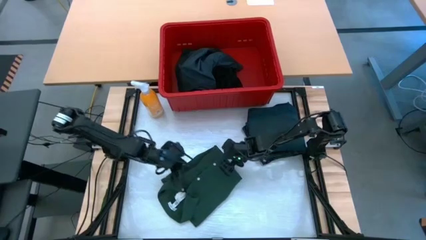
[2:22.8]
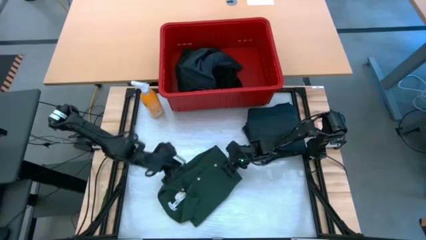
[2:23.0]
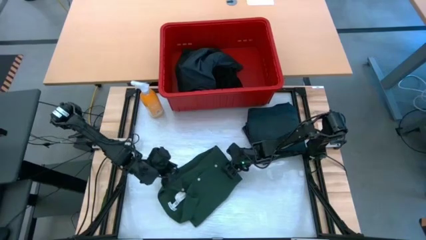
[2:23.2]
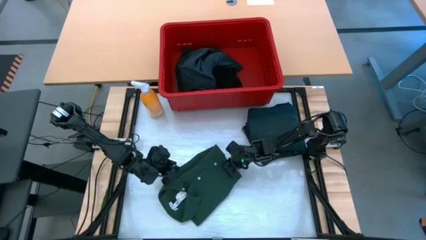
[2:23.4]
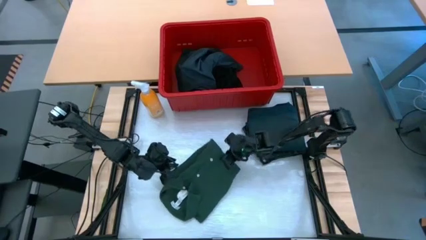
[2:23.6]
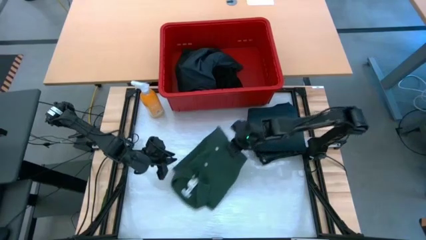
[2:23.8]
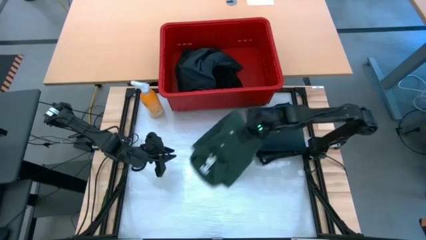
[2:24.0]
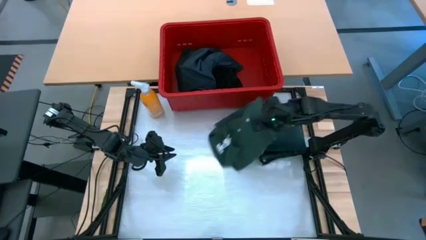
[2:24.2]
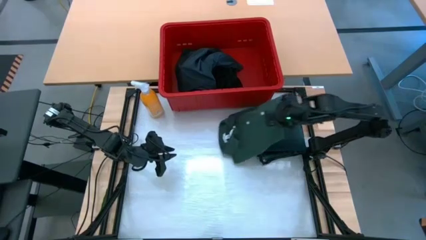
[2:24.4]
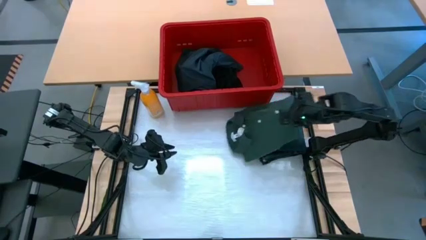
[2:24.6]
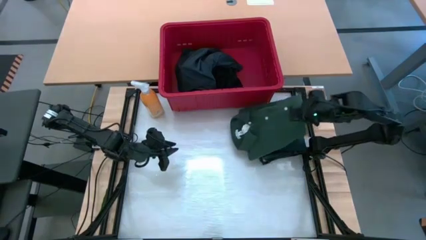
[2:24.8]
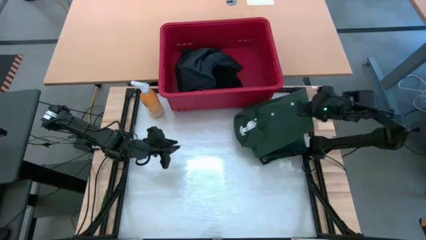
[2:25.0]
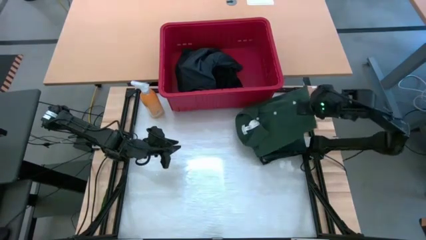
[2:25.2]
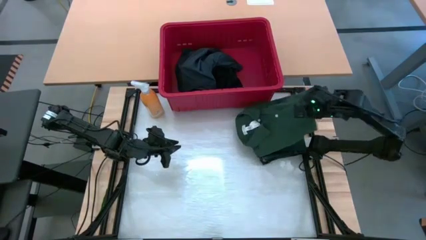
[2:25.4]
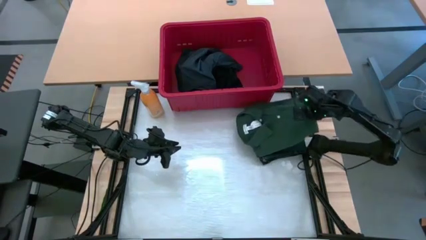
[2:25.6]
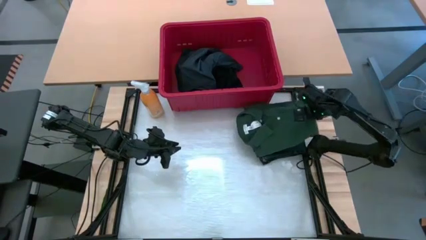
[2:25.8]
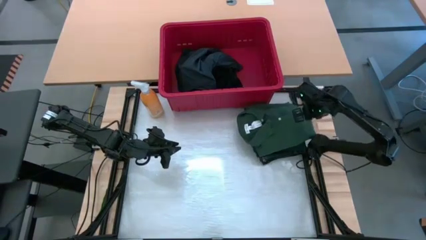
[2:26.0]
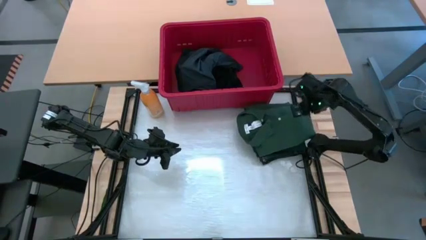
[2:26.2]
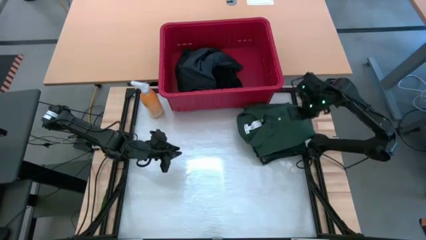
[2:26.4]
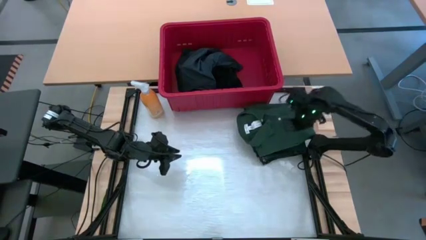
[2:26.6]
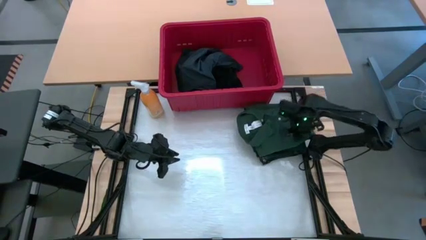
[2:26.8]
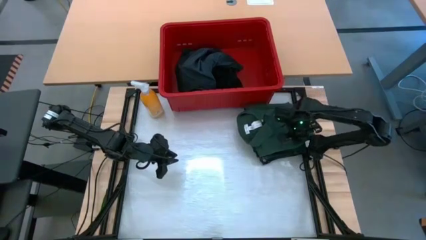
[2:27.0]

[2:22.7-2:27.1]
Task: Fold Laundry from Bin
Stack the green shirt on top of the blue pants

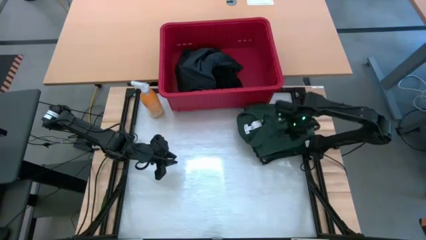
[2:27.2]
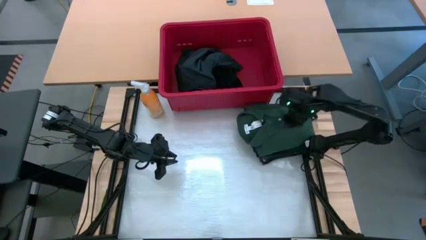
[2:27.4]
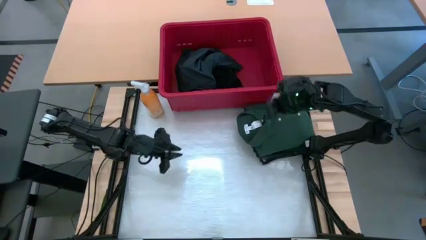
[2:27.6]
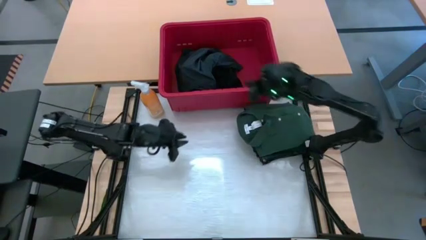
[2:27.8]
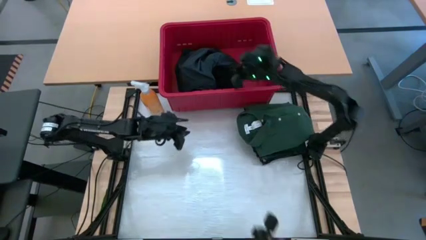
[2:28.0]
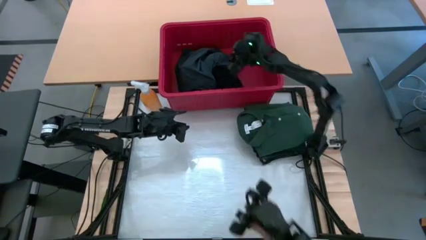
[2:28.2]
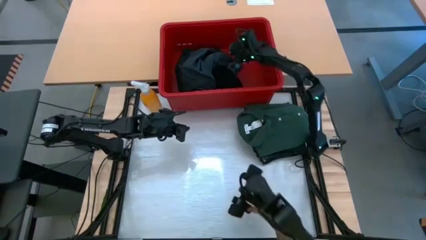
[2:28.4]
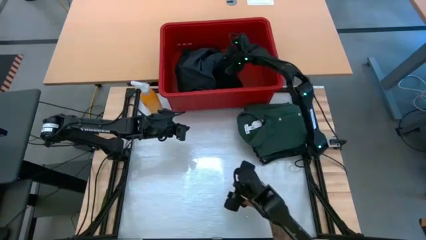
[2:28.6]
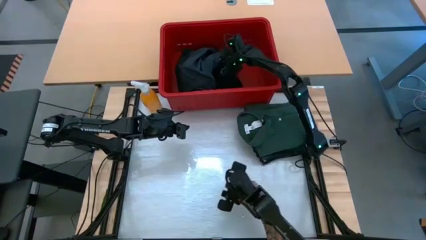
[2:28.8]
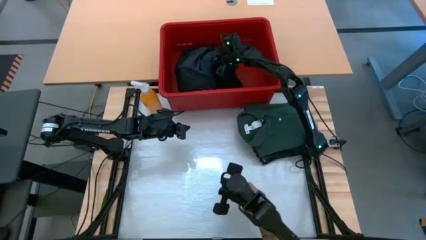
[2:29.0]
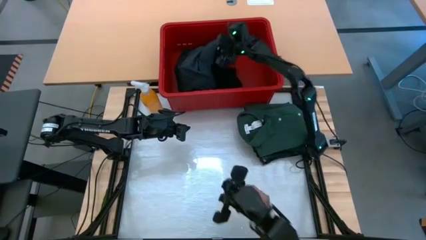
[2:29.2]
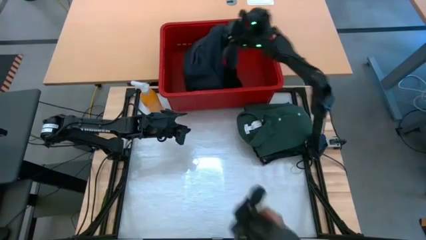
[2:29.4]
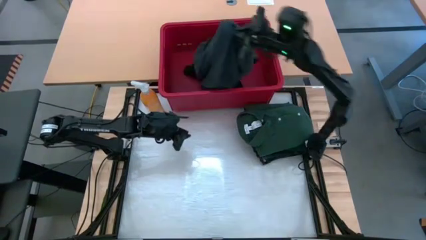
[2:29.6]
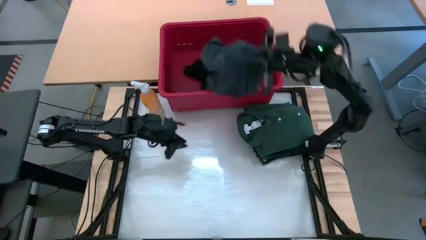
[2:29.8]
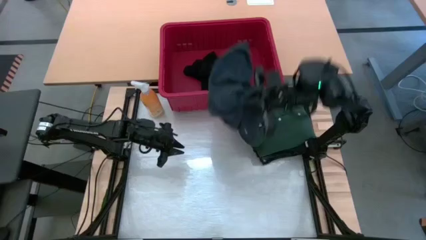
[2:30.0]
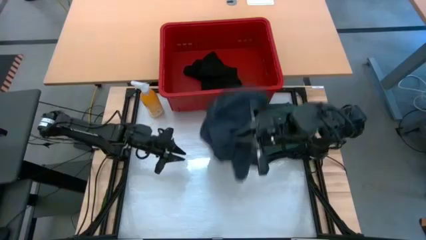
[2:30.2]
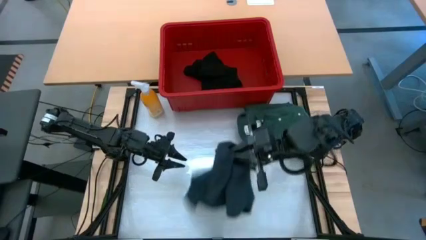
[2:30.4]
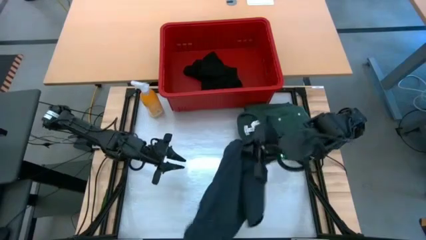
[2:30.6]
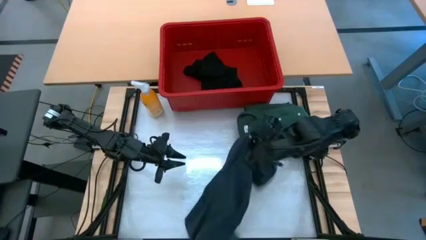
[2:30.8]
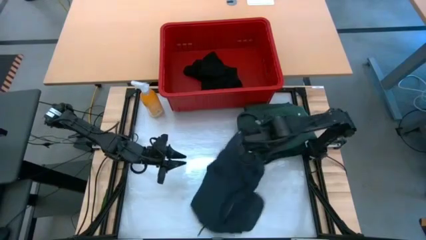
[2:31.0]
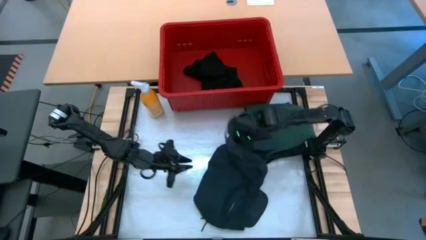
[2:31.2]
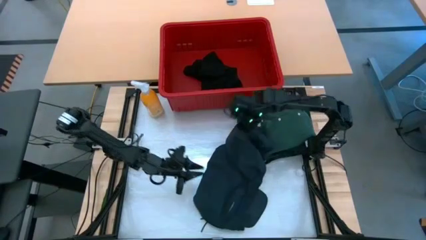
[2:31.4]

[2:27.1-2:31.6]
Remove the dark blue shorts from the red bin

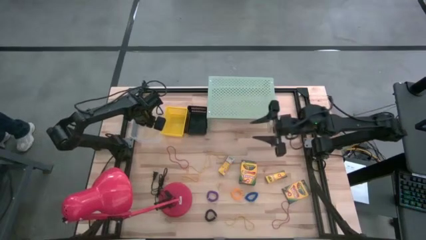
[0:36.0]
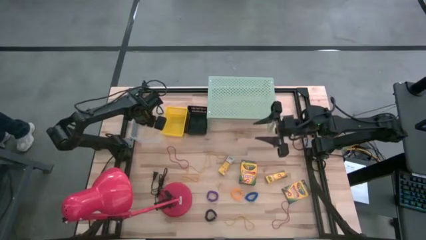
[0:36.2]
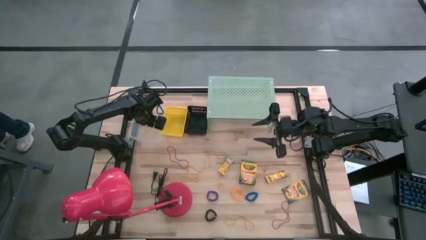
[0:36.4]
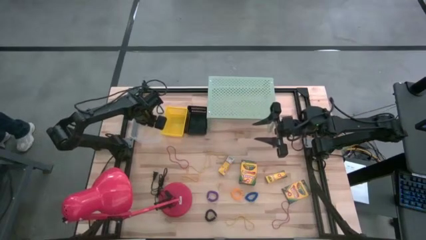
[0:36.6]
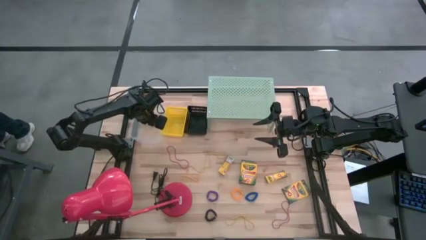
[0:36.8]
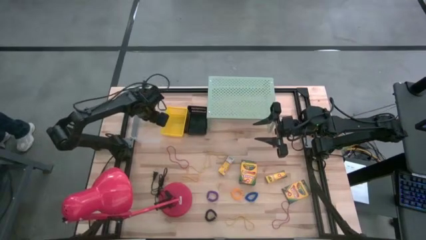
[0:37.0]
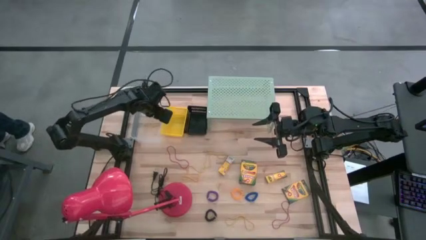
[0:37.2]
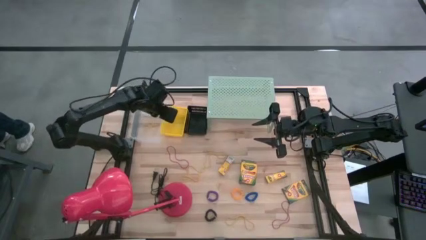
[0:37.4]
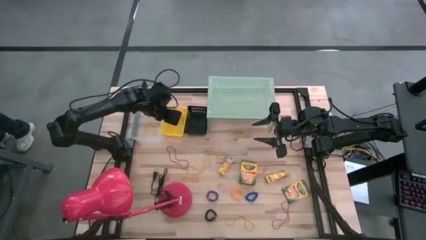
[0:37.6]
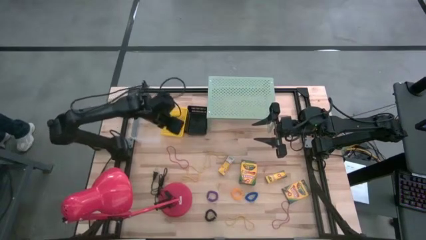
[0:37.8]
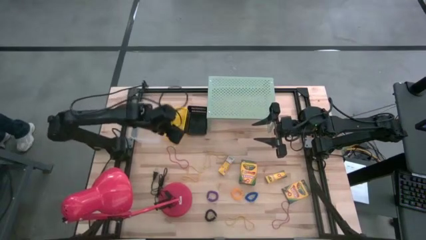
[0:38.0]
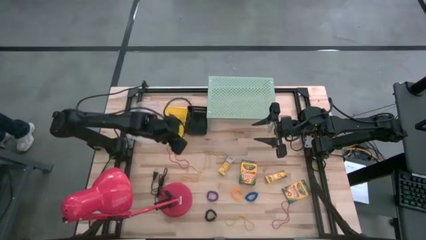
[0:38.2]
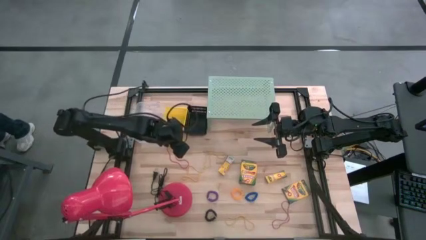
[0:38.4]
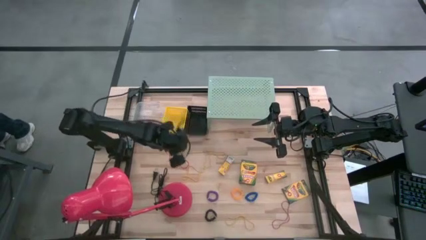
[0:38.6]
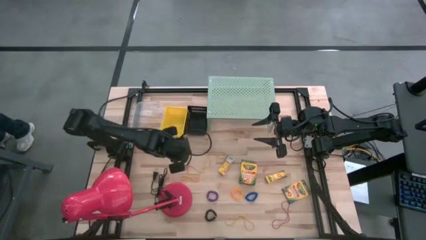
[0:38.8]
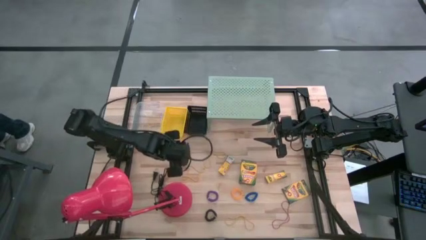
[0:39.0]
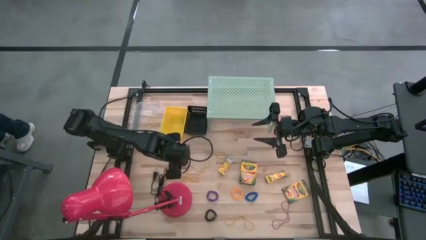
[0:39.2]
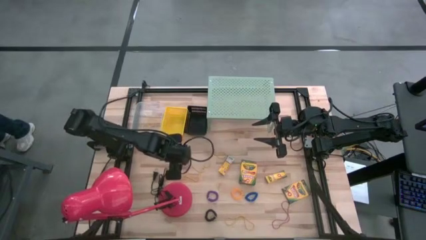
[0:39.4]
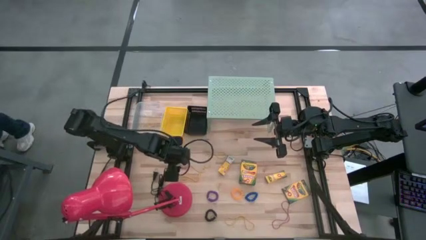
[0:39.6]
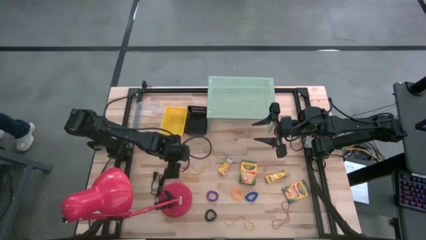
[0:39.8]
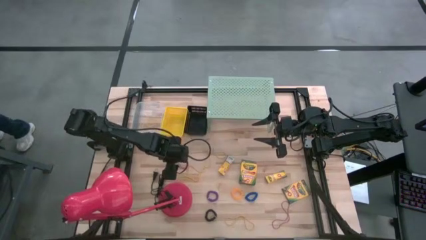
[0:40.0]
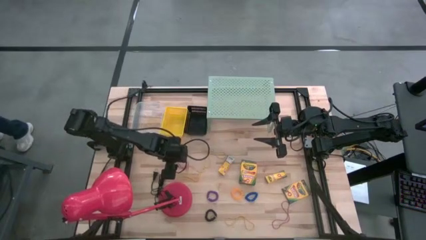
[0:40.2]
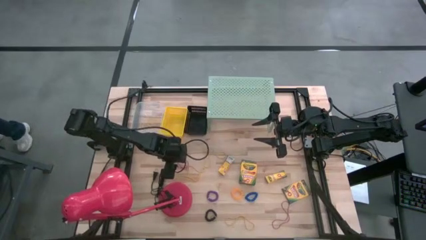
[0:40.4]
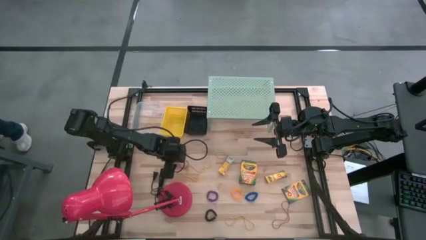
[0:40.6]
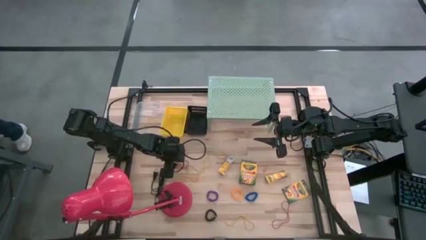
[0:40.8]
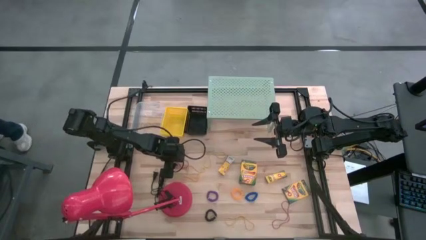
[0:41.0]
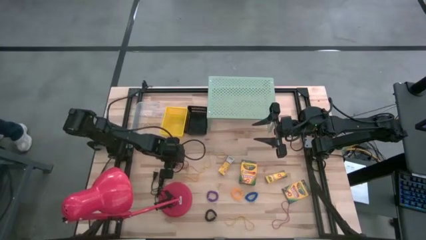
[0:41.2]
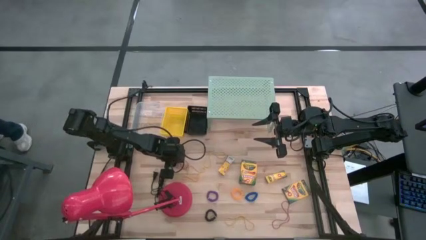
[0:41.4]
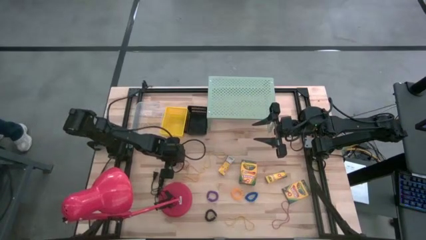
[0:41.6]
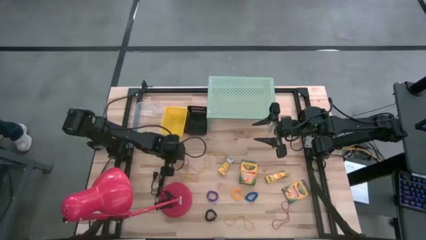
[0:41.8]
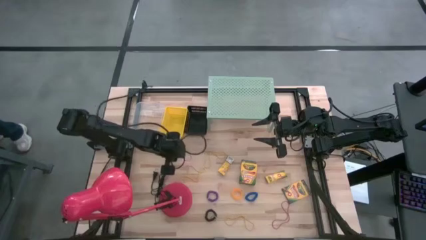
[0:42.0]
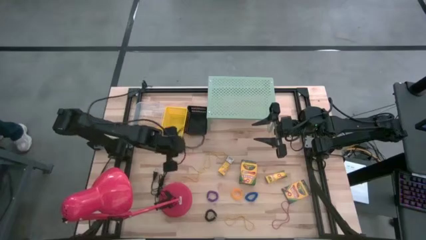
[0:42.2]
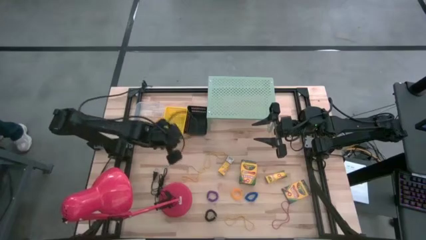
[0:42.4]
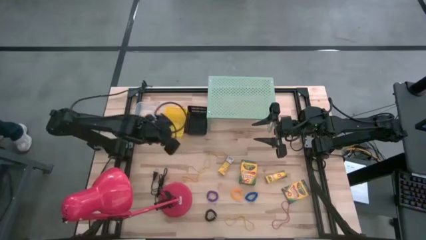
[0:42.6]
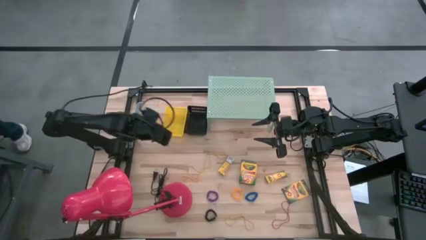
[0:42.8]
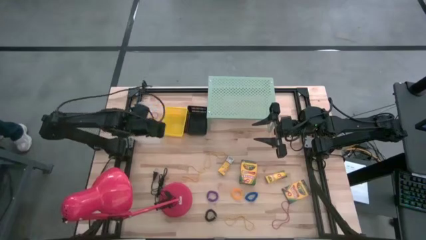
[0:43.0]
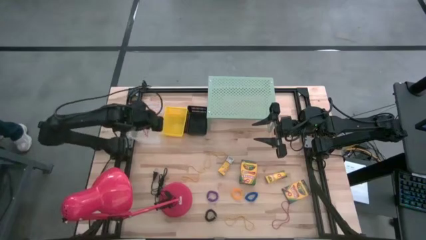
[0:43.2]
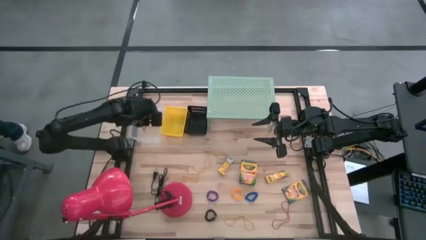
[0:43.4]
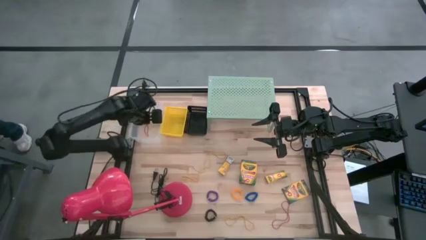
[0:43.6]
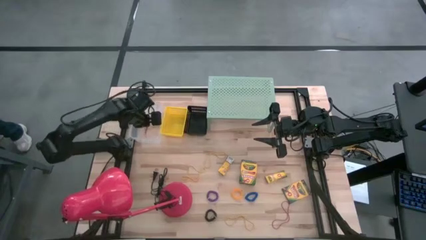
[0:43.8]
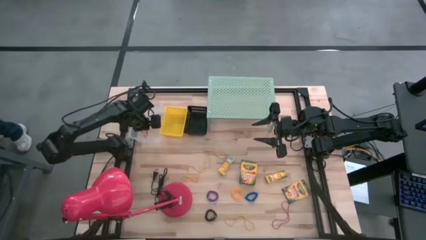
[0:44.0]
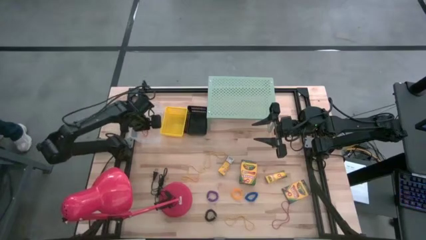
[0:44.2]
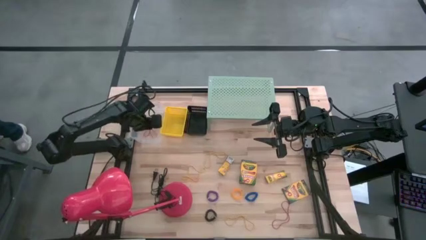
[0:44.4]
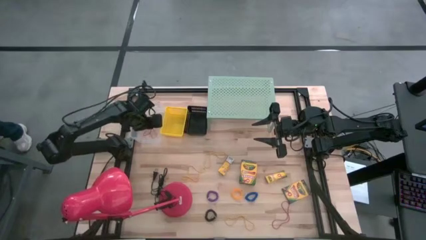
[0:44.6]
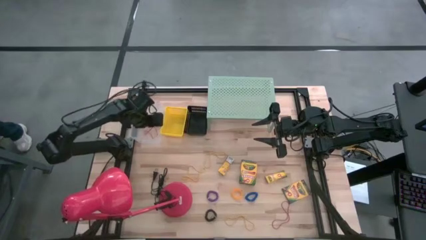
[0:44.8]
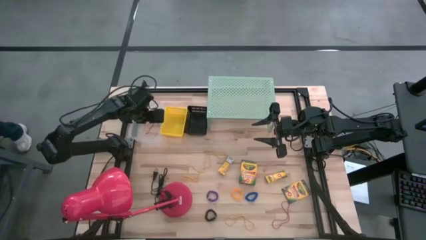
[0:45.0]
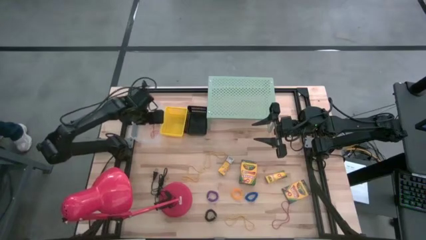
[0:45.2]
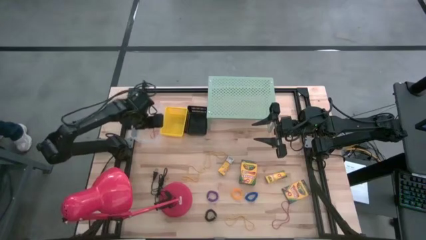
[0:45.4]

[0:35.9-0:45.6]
Task: Pick & Place Office Desk Supplies
Put the red rubber band into the transparent bin
